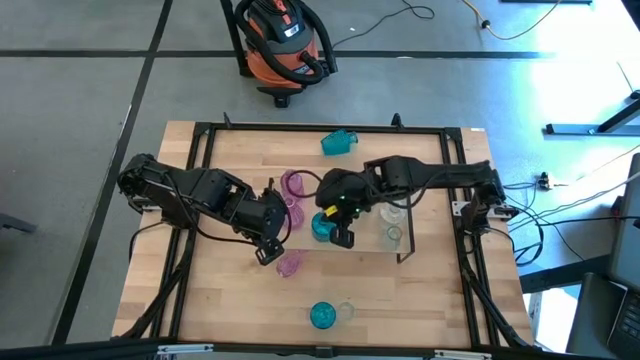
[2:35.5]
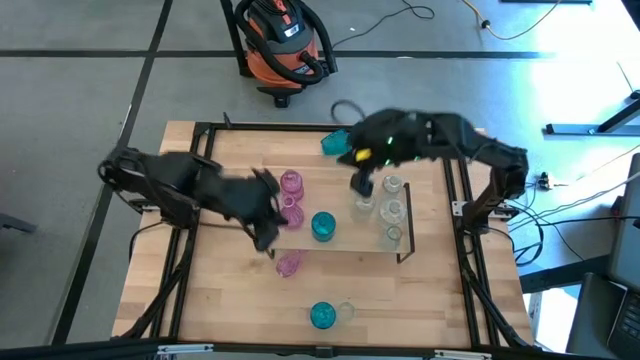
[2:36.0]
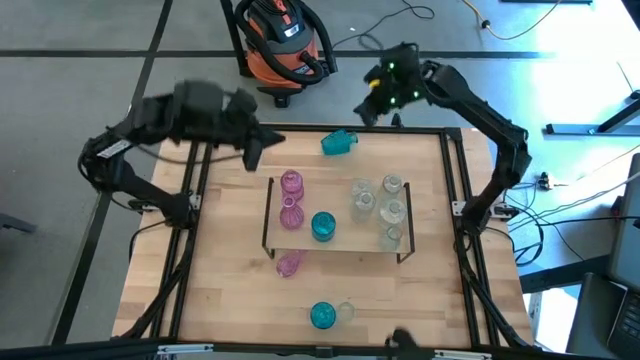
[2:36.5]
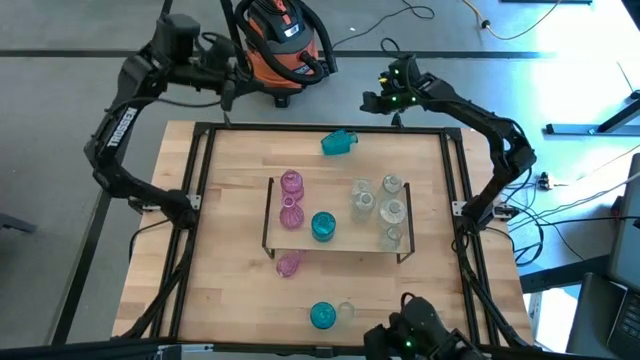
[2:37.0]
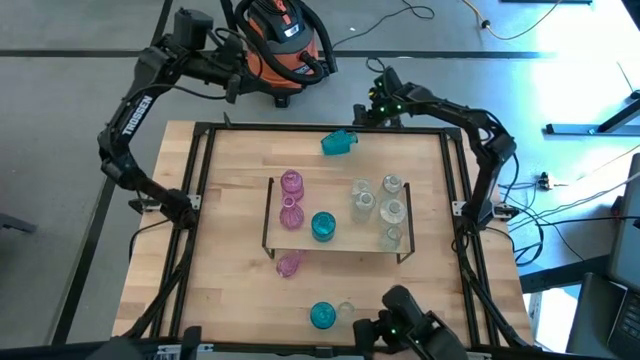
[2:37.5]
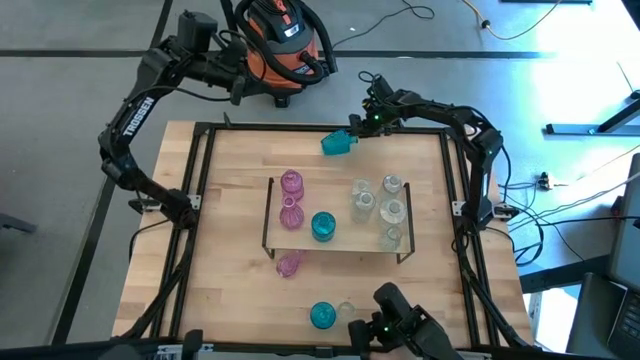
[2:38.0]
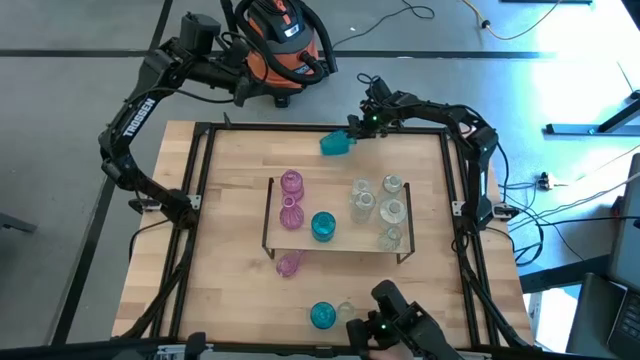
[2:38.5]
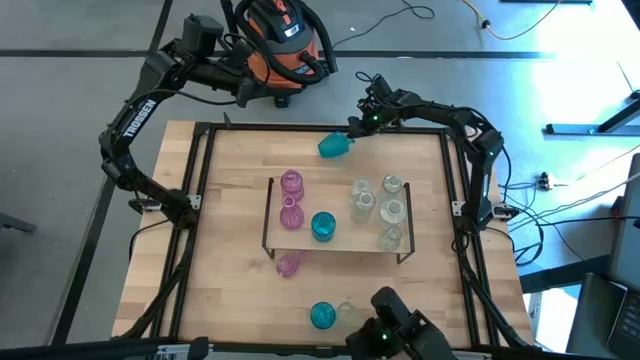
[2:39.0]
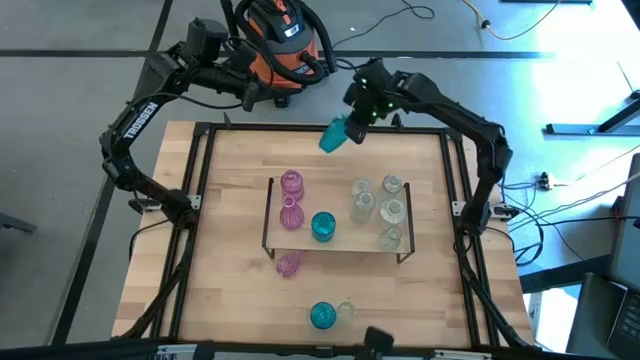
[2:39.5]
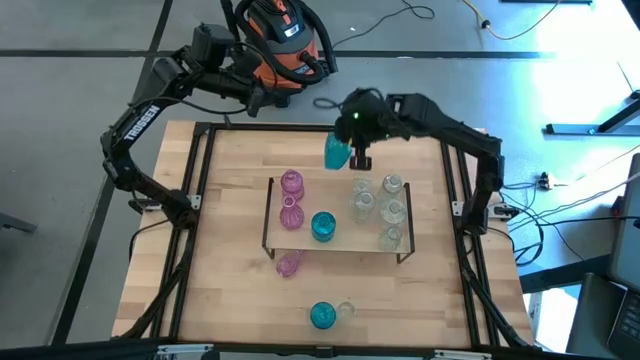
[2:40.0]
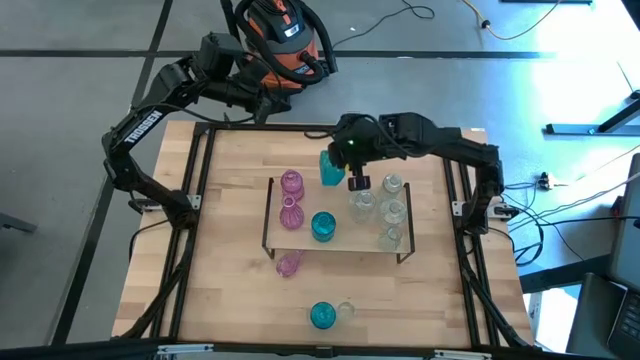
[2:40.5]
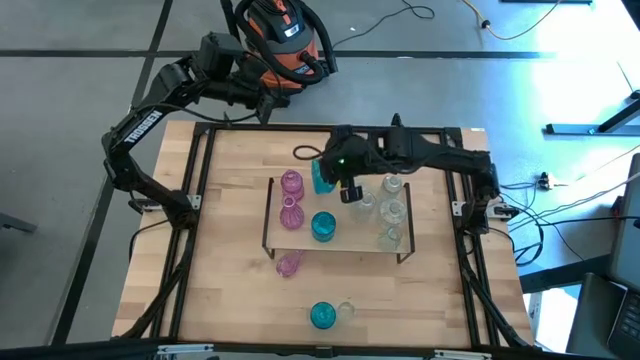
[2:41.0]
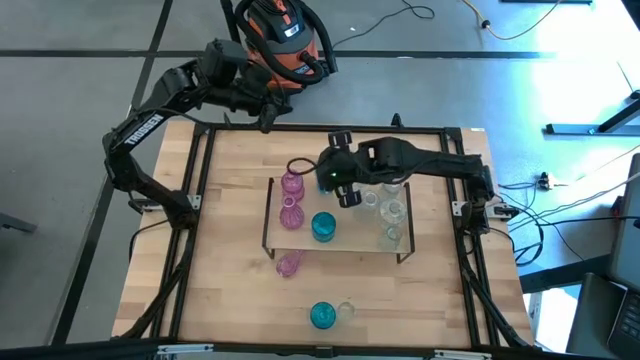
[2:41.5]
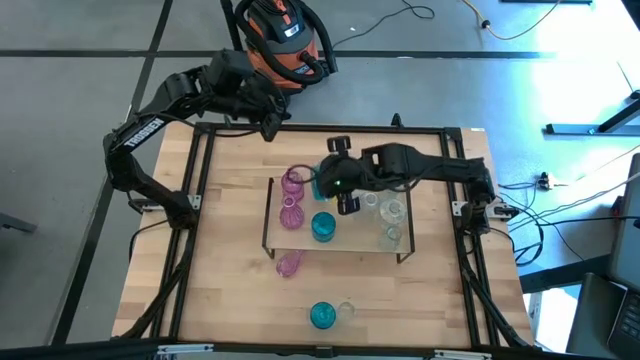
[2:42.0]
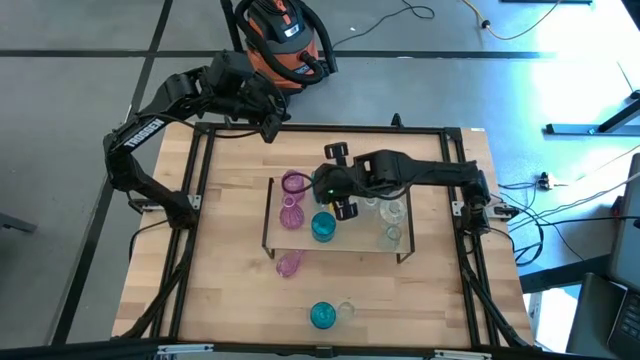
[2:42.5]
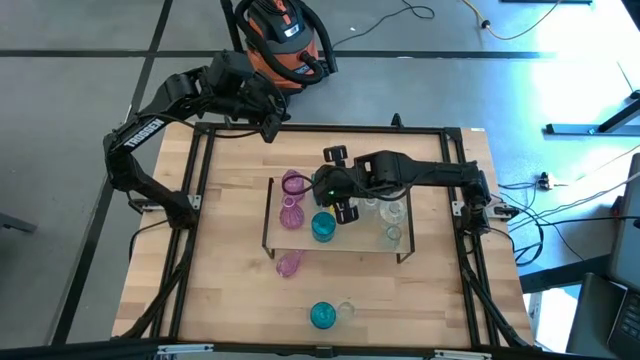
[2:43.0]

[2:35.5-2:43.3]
Task: sort vases onto shelf
Put the blue vase on the shelf aligned with the other blue vase

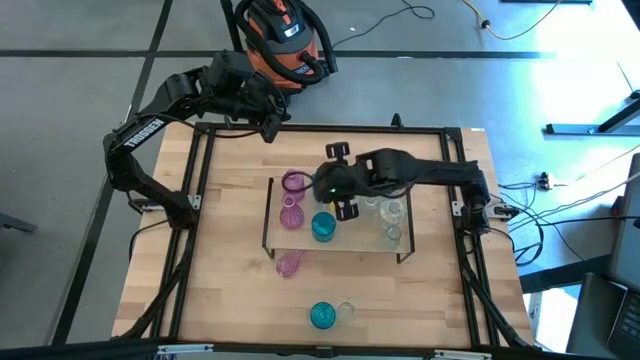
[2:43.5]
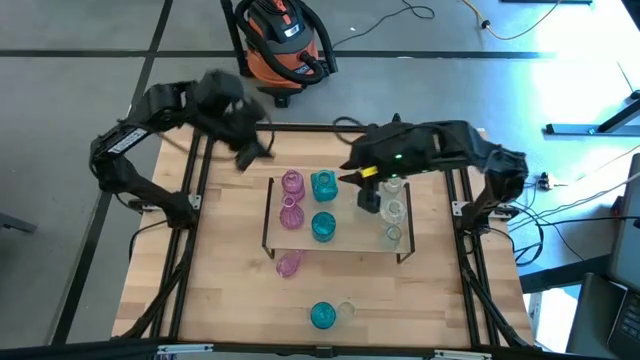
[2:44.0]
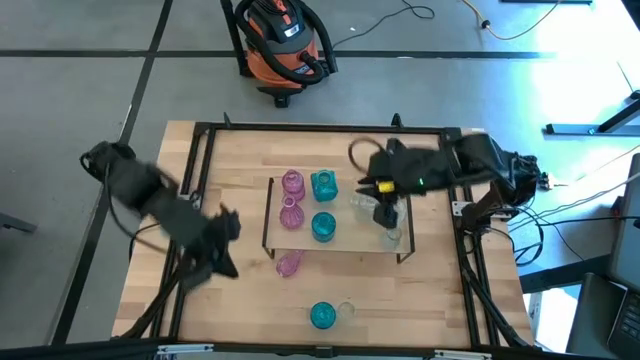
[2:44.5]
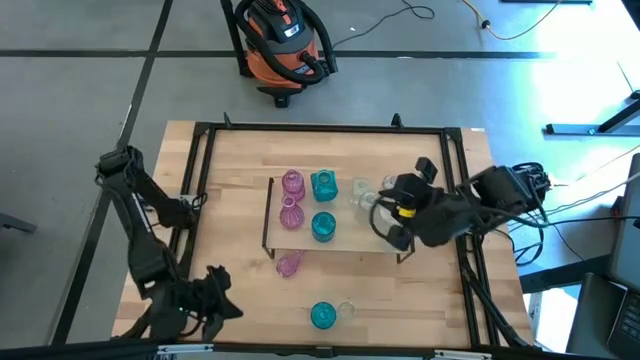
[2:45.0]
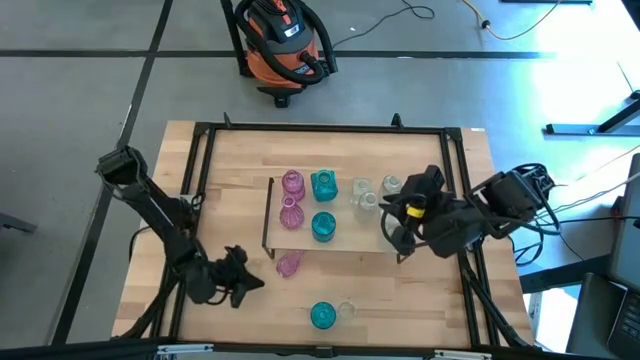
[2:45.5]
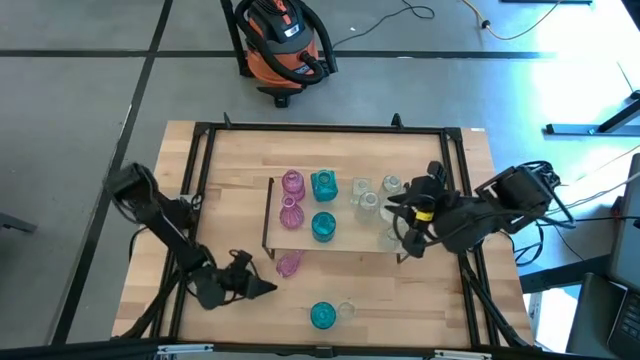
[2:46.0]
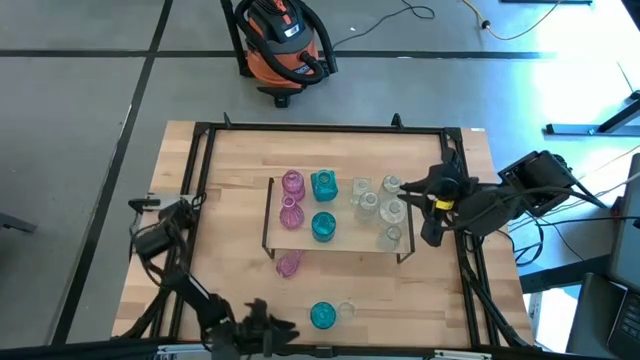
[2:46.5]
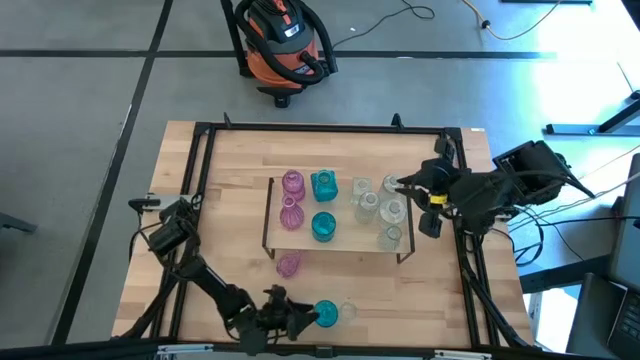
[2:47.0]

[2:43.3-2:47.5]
Adjust the blue vase on the table

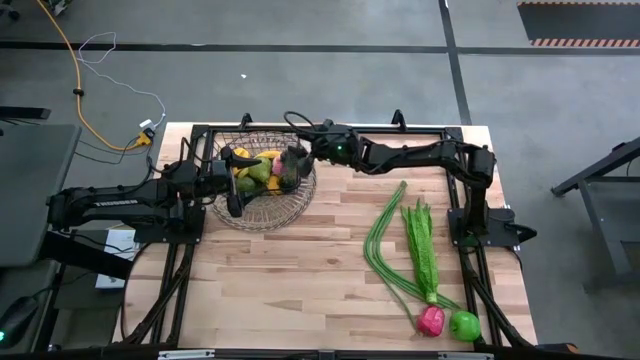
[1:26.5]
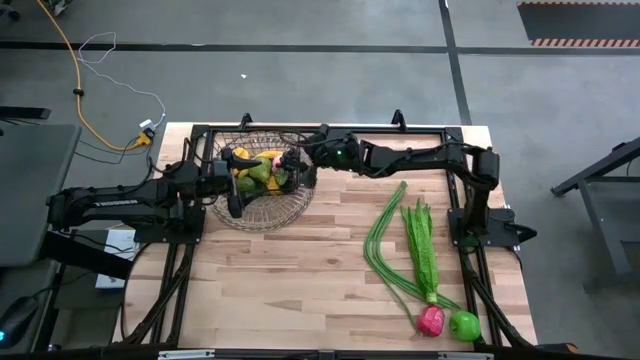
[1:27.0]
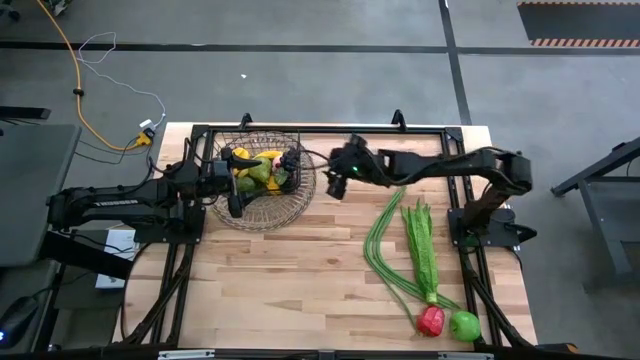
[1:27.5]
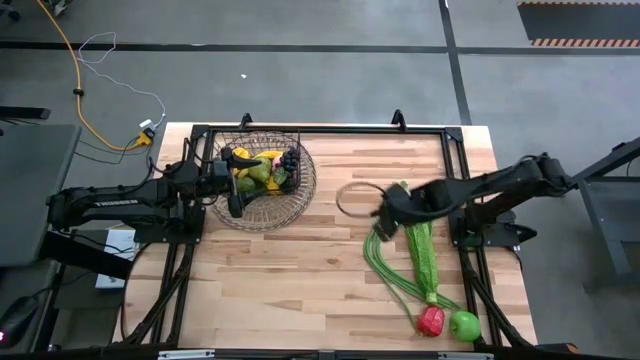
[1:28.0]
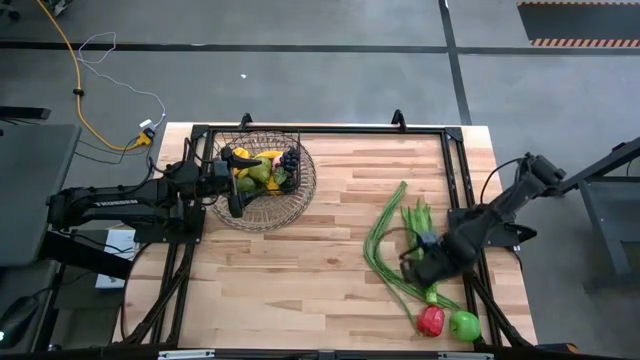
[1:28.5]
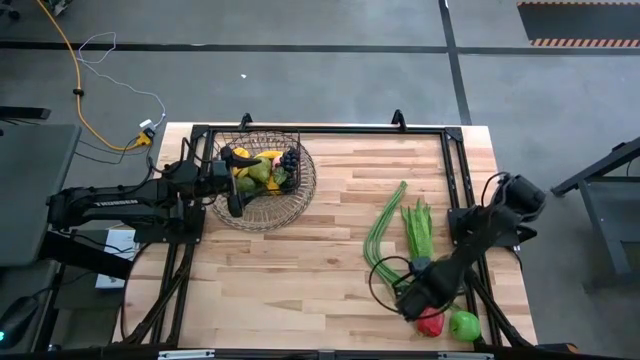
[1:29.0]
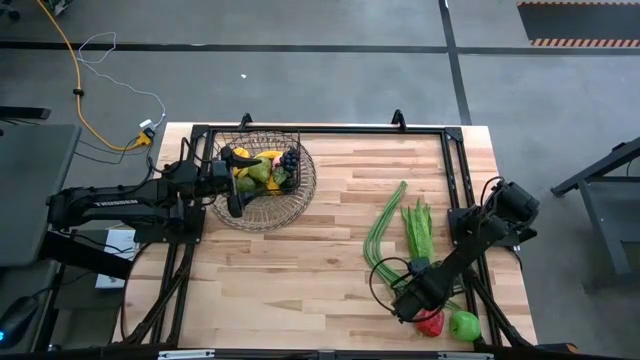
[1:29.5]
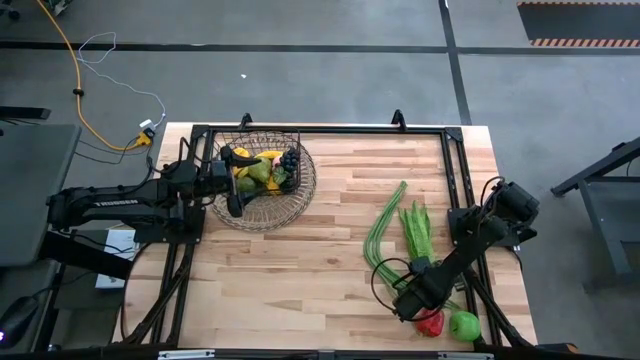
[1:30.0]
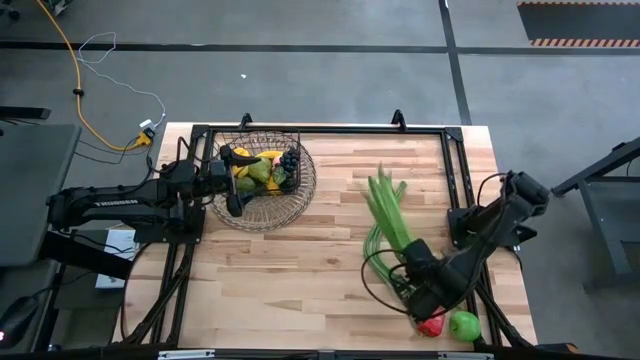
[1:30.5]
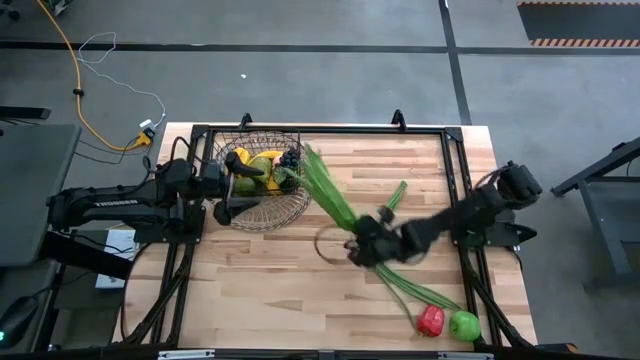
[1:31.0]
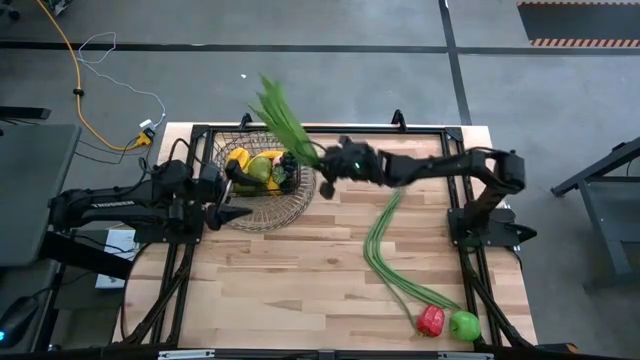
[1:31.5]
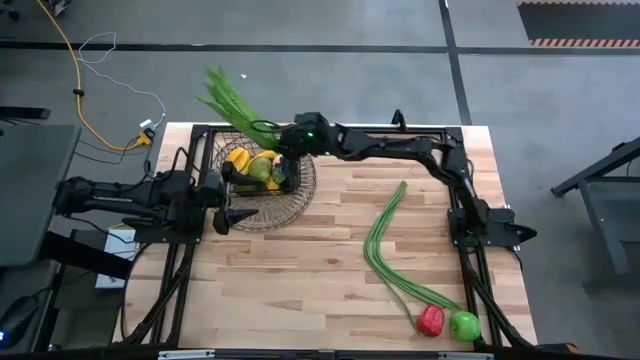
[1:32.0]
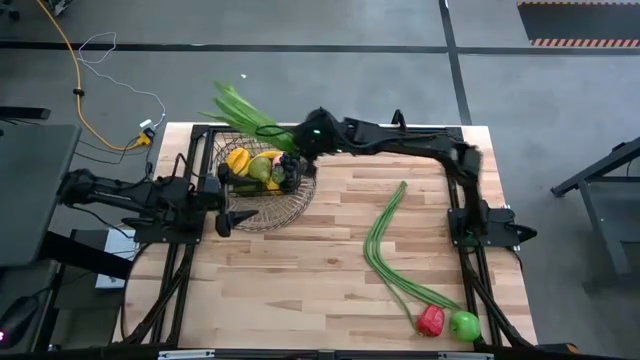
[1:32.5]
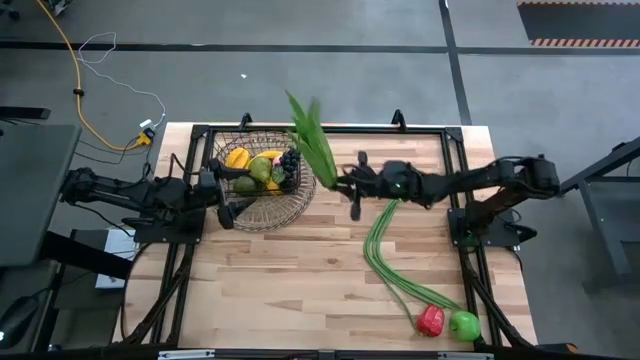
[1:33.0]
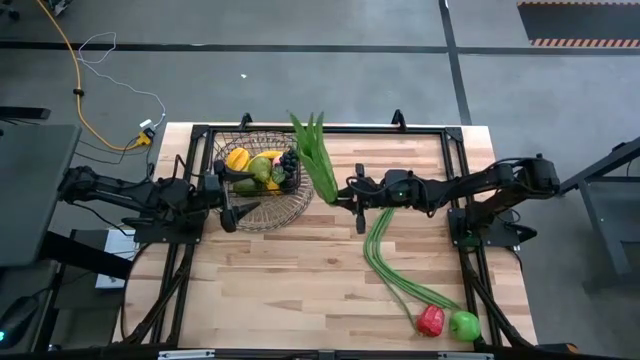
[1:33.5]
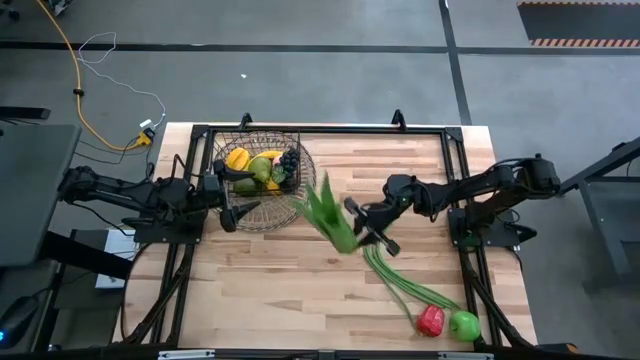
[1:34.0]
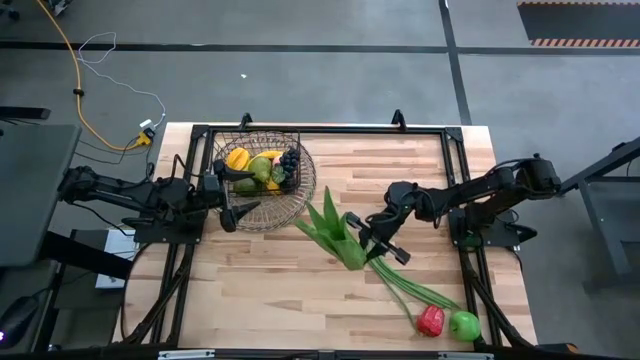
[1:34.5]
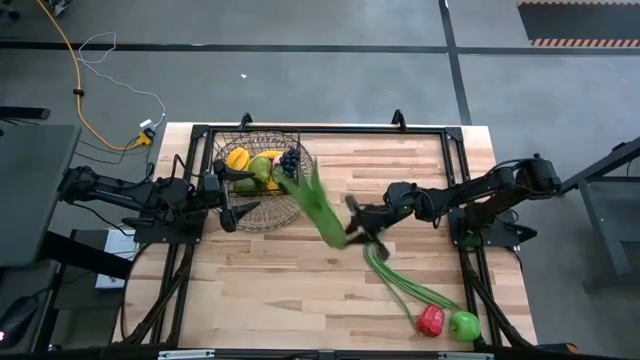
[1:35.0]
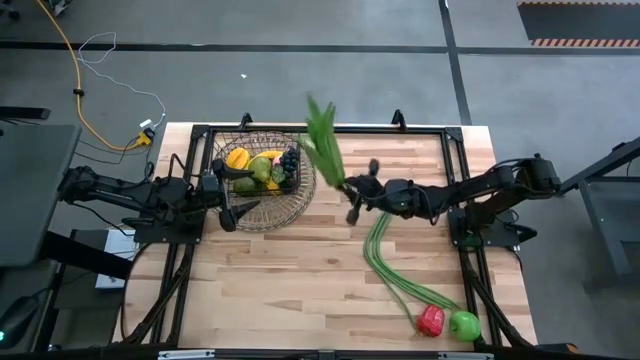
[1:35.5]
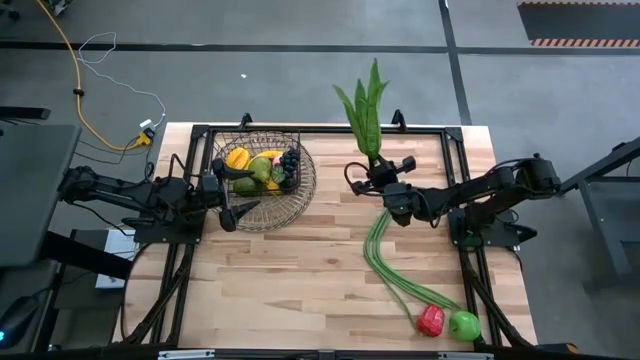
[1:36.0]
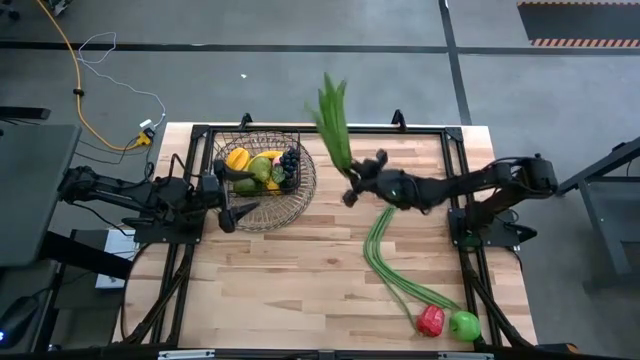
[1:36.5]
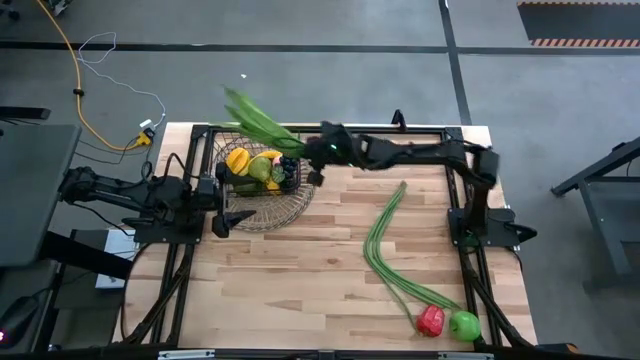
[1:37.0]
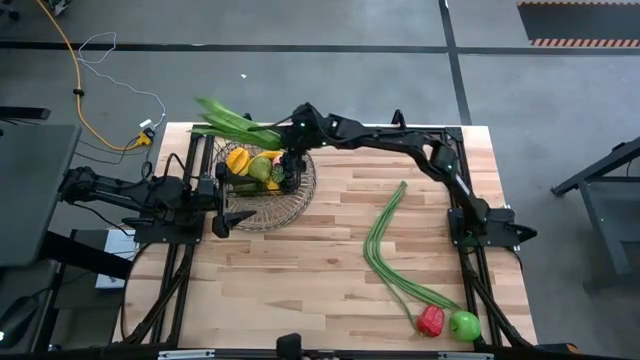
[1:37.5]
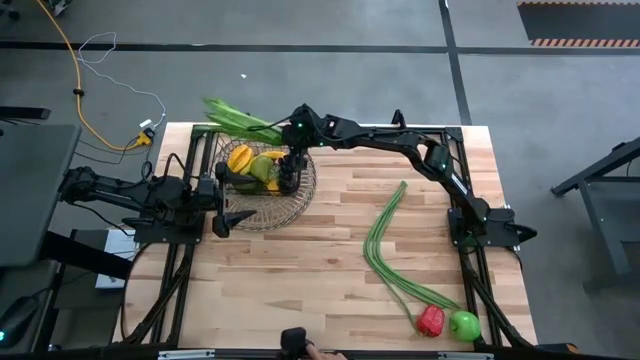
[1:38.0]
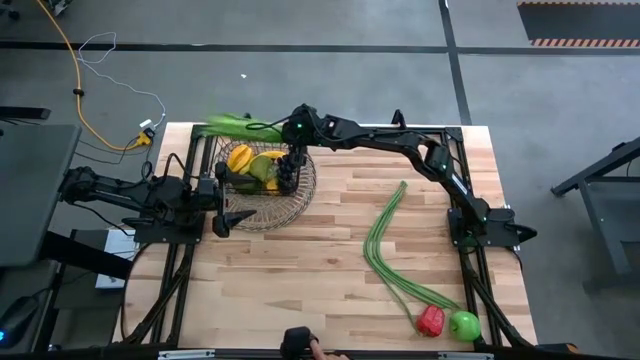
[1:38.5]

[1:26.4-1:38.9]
Task: Build produce basket
Put the green leaf lettuce into the wire basket
